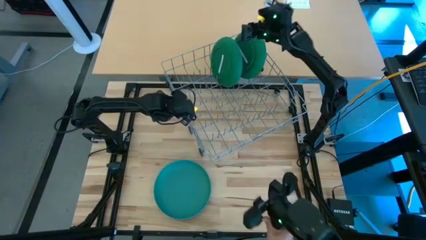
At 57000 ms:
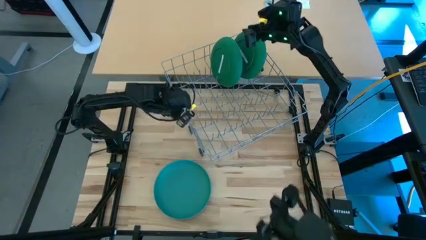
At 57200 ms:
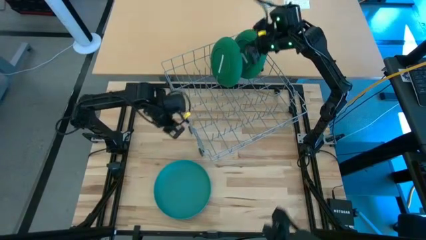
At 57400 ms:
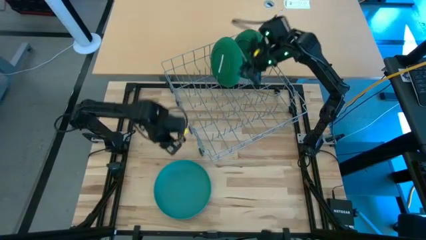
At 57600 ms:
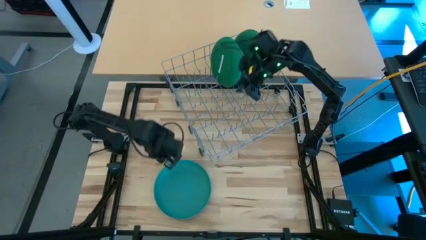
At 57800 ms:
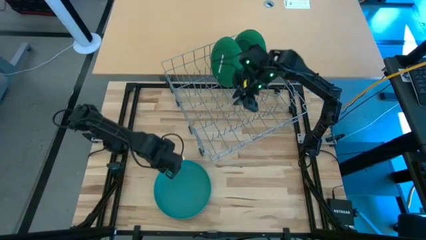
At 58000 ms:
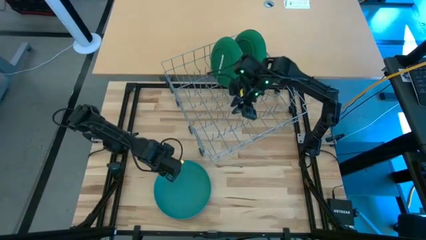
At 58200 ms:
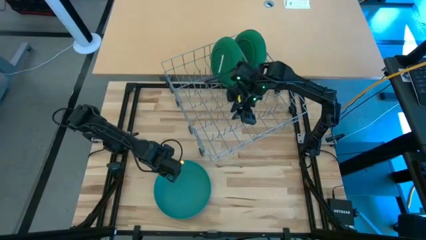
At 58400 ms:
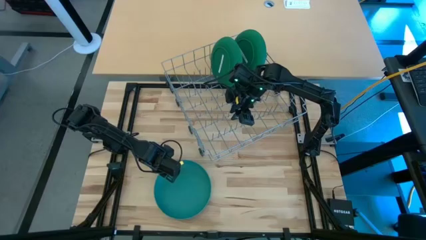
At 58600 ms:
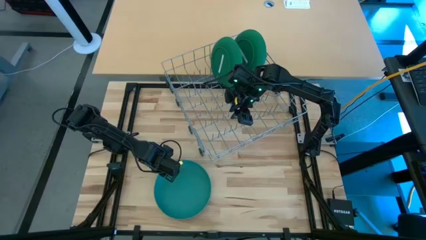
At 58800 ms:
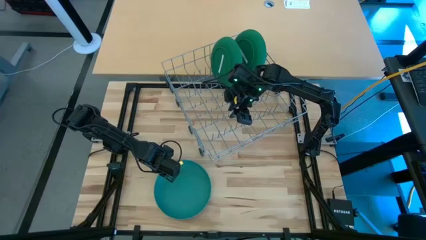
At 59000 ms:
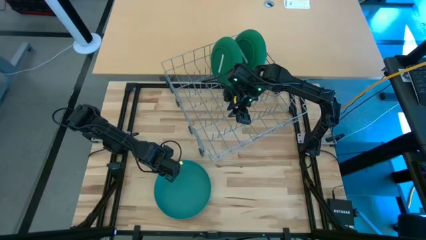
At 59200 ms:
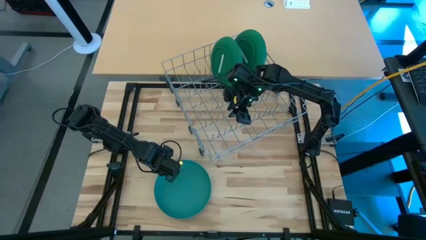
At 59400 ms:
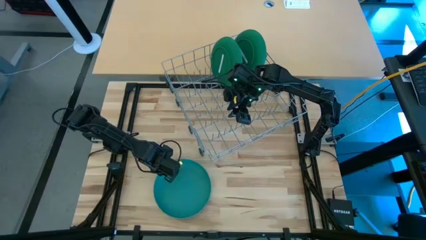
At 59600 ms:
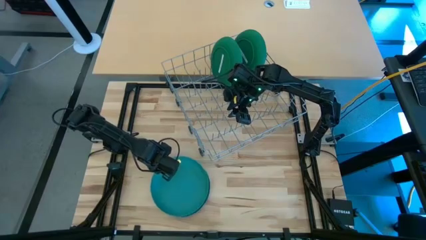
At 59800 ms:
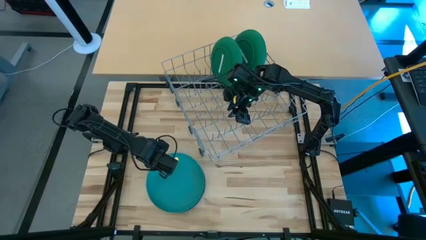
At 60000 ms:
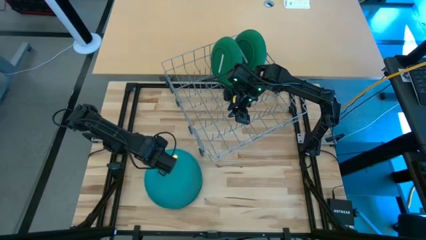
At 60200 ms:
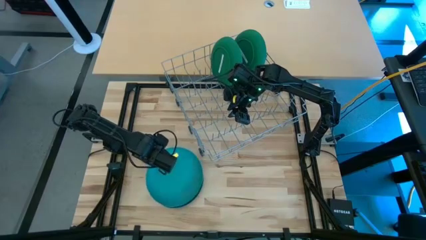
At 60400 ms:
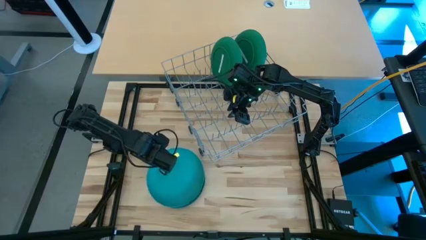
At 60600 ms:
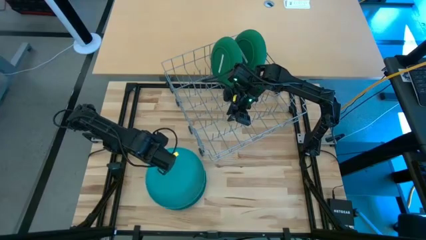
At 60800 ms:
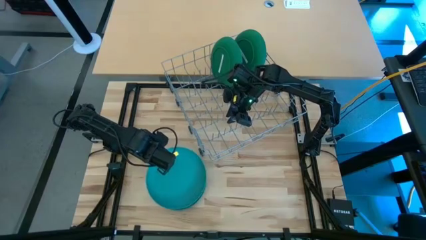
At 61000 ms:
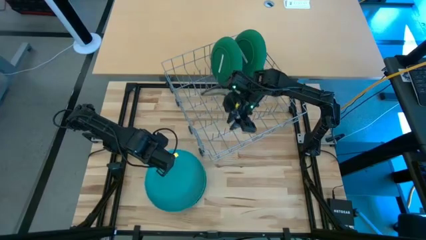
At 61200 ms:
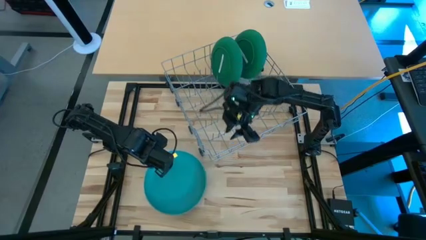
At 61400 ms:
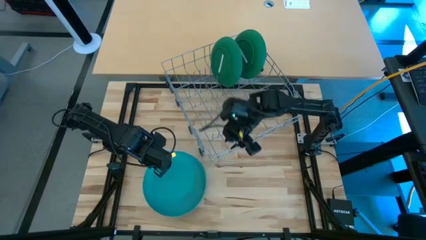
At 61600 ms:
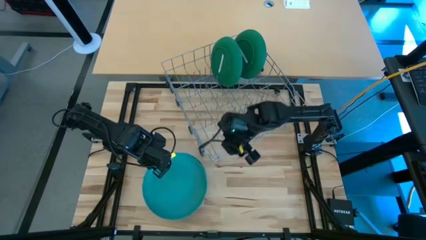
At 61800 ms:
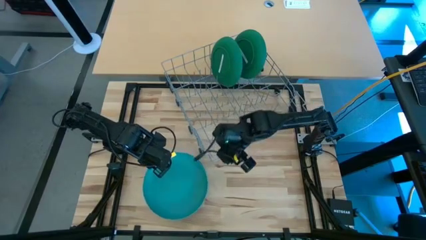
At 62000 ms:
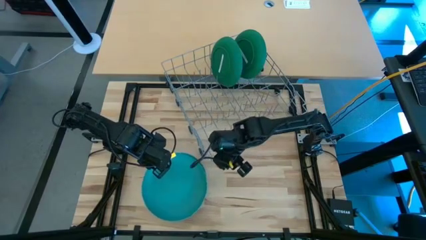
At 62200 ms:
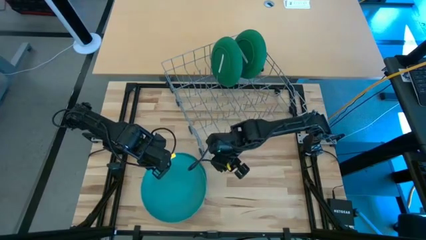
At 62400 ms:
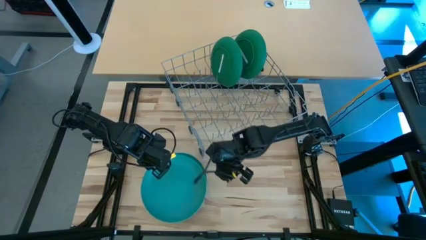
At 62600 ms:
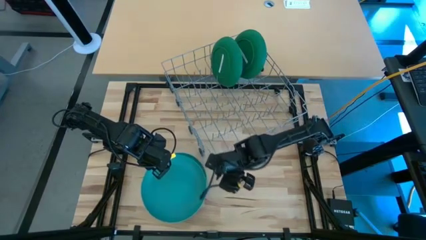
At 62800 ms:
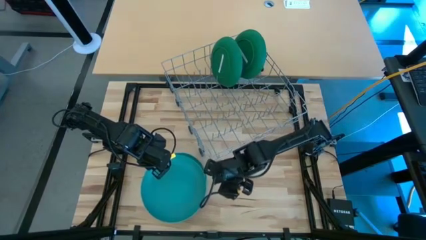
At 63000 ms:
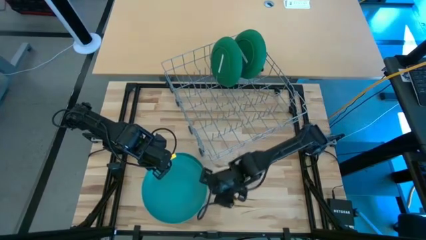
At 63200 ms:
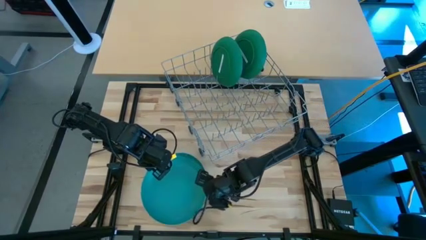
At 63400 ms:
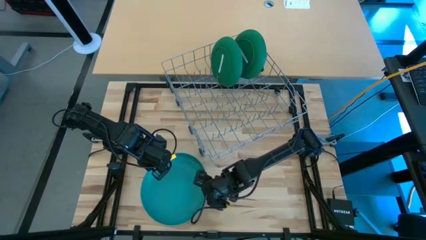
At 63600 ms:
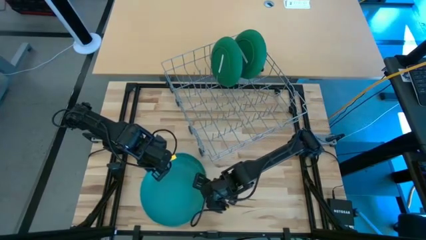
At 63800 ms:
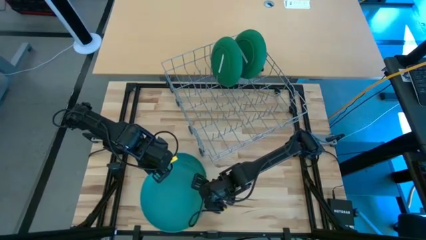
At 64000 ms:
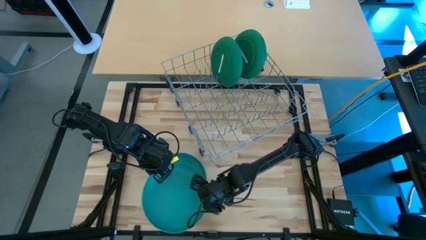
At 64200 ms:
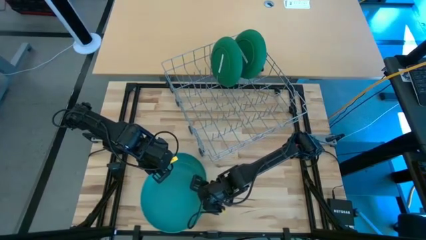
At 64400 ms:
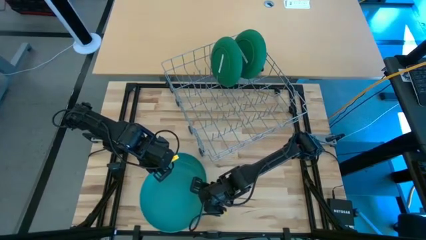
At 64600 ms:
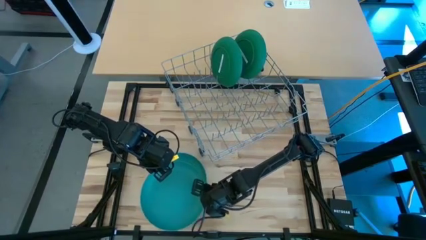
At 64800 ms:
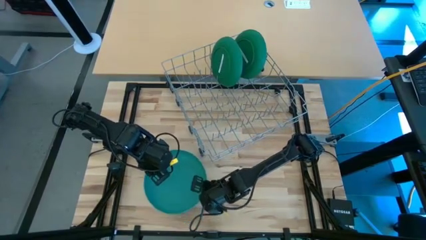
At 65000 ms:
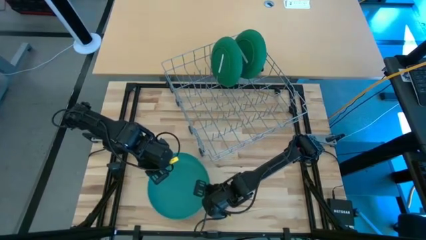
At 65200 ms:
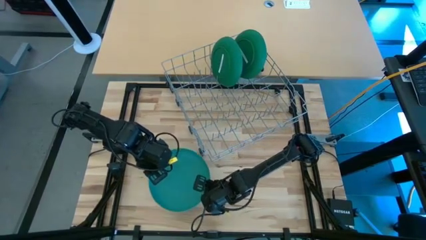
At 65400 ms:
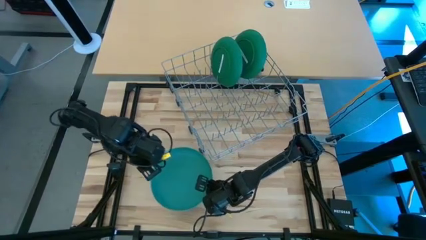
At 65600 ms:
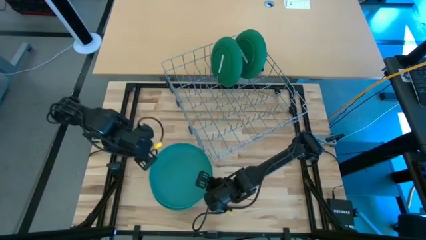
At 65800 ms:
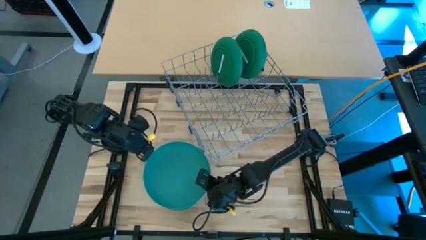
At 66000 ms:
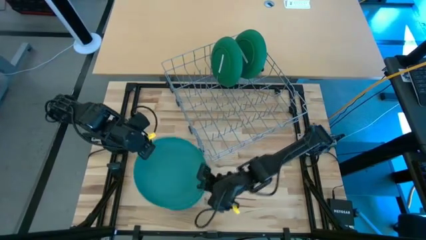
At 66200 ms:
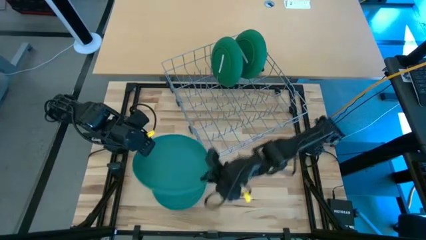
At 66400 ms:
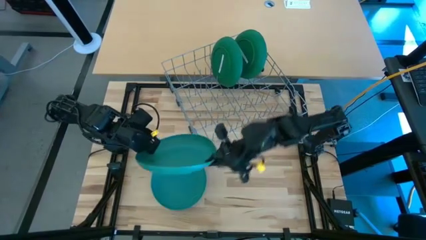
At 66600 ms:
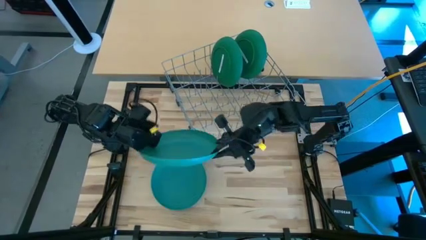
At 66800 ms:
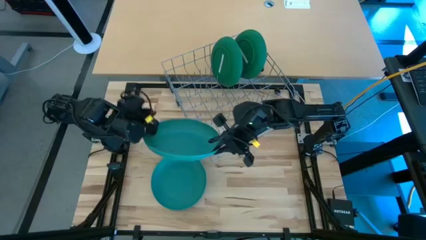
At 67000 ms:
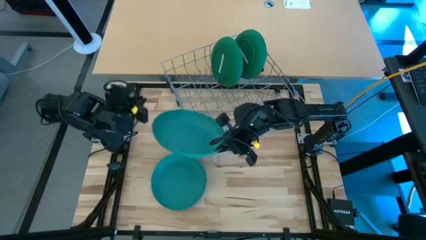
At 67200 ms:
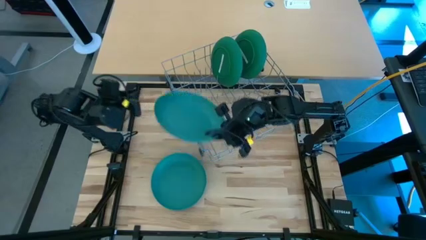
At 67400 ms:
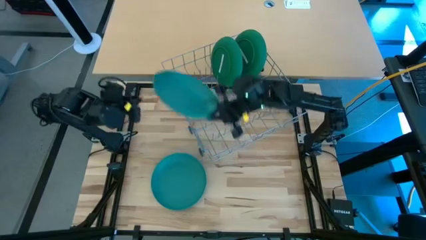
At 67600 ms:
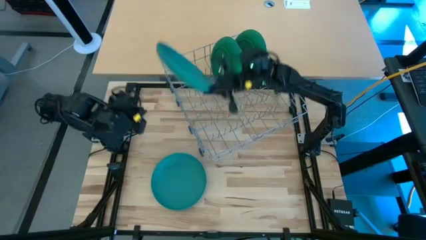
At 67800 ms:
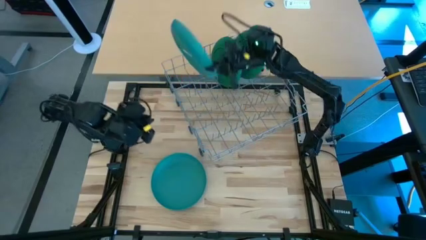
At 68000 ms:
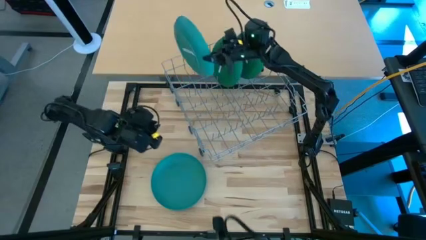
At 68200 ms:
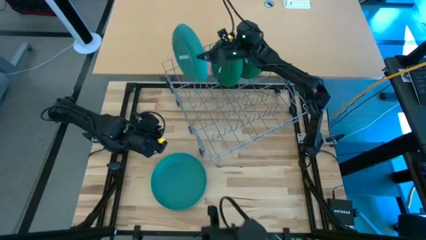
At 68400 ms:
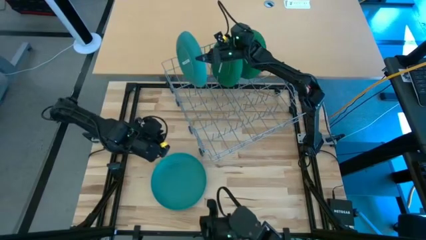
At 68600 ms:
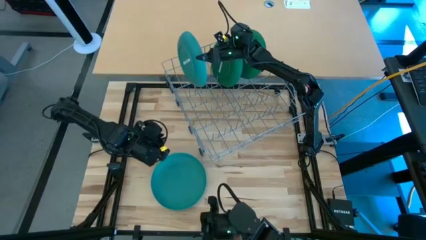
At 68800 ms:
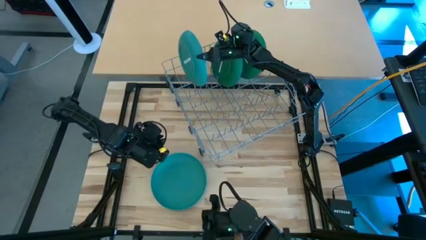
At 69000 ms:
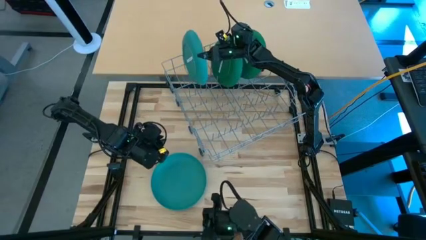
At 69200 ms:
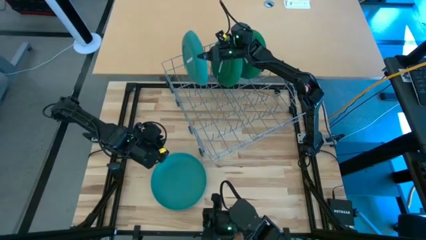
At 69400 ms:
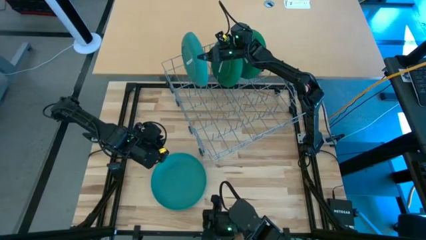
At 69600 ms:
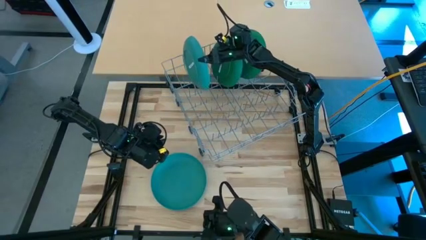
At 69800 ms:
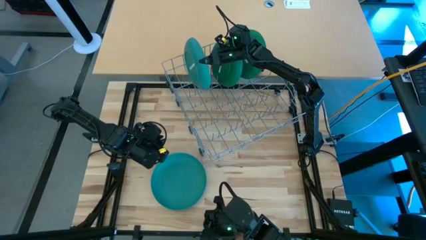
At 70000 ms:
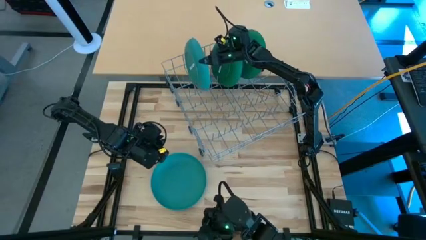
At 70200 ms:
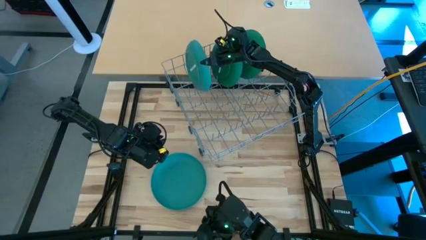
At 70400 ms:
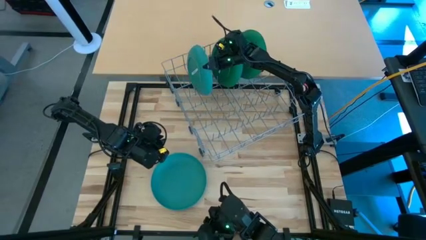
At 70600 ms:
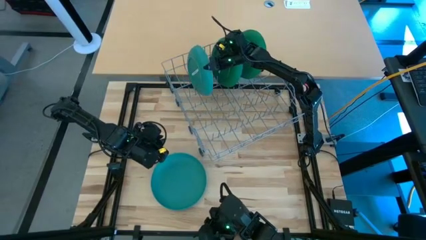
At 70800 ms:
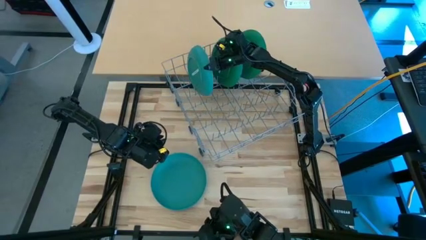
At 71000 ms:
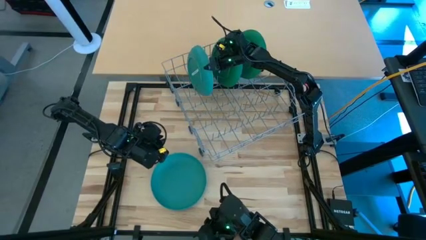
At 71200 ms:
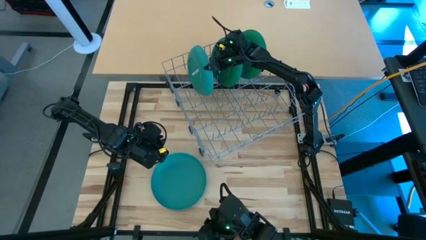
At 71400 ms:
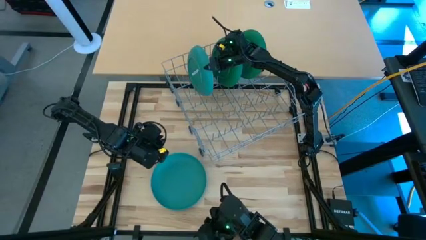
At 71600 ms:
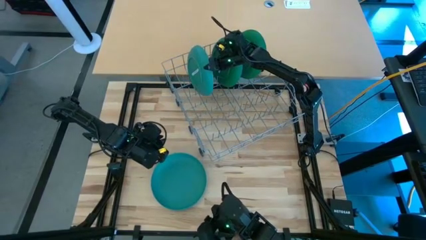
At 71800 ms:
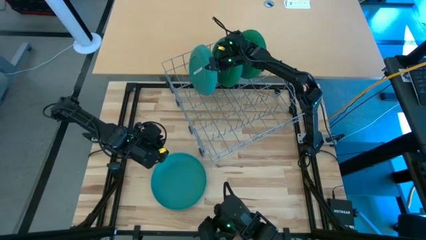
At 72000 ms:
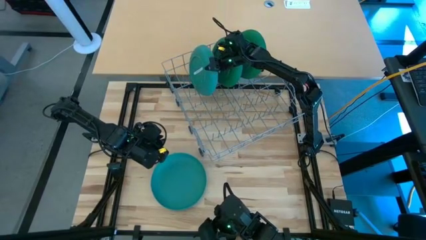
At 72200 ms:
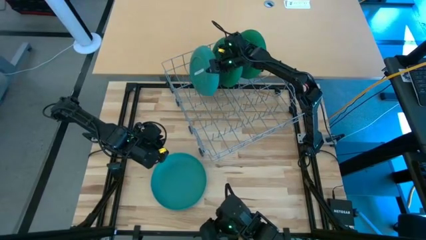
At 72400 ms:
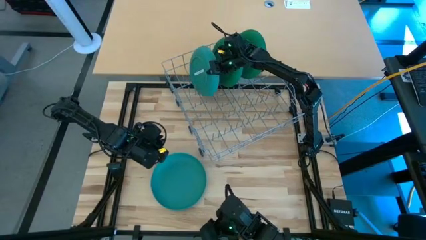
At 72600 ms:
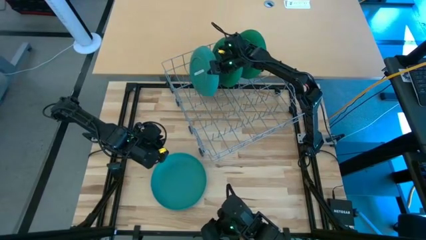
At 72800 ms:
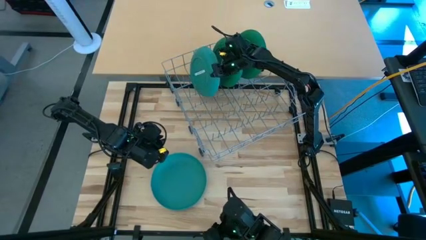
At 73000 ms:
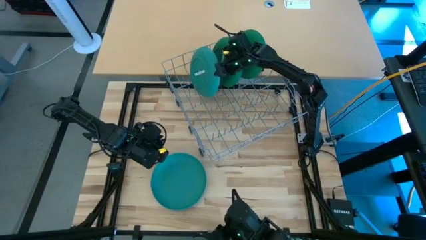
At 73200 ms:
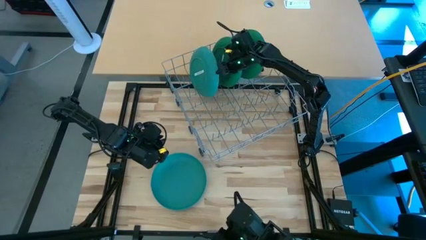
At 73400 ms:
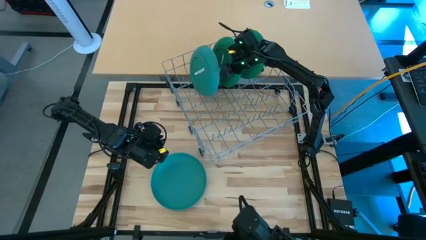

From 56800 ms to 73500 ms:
Task: Sort dishes
Put the light green plate in the dish rack
